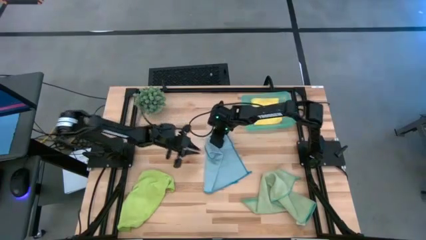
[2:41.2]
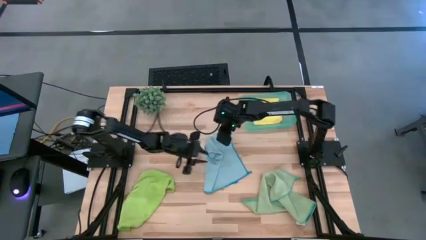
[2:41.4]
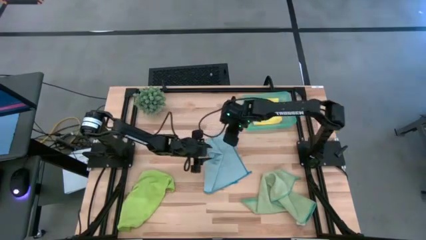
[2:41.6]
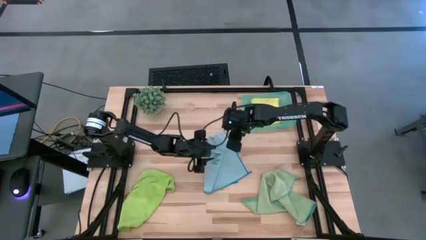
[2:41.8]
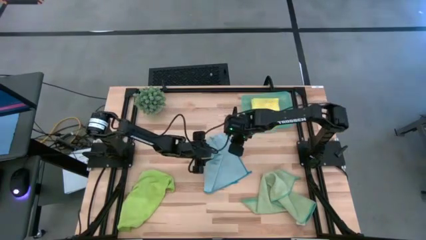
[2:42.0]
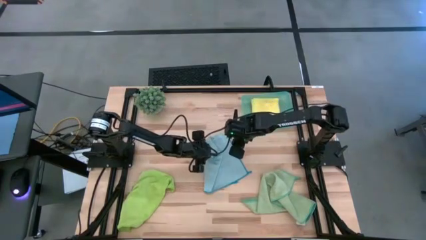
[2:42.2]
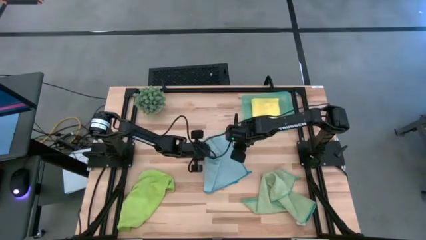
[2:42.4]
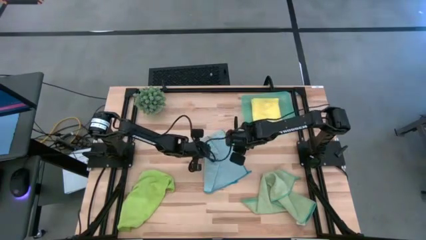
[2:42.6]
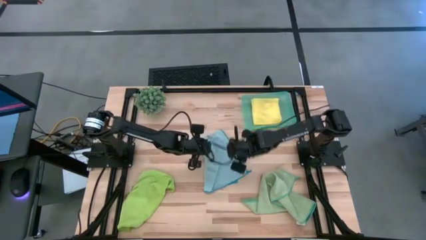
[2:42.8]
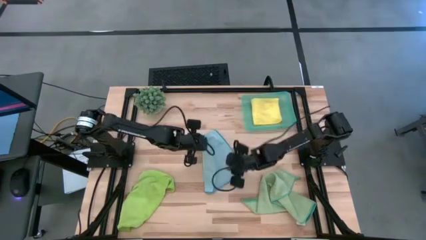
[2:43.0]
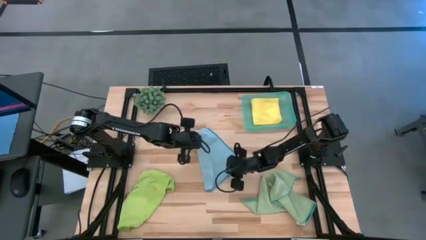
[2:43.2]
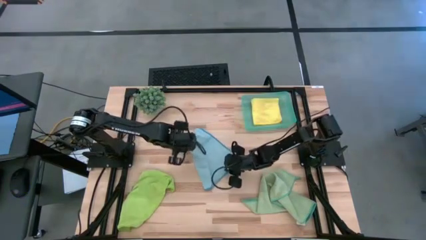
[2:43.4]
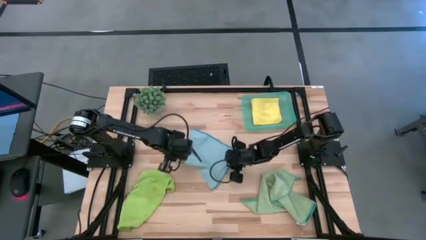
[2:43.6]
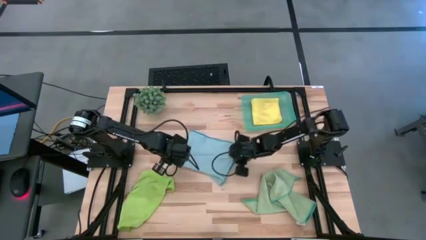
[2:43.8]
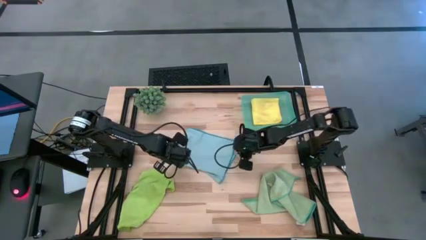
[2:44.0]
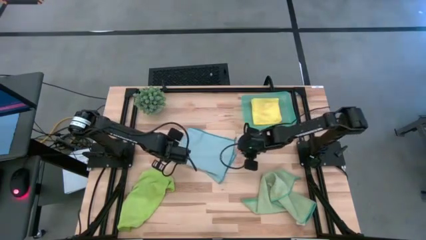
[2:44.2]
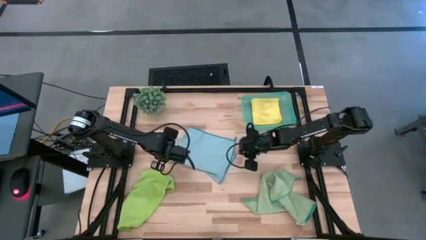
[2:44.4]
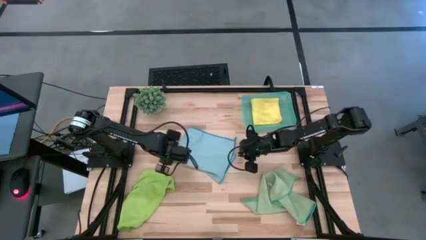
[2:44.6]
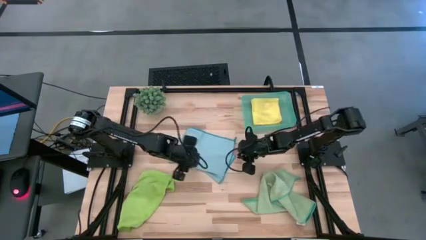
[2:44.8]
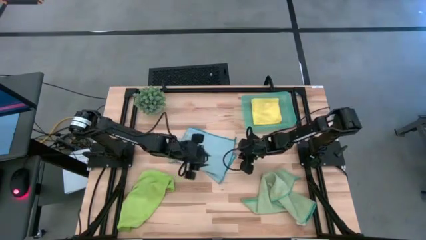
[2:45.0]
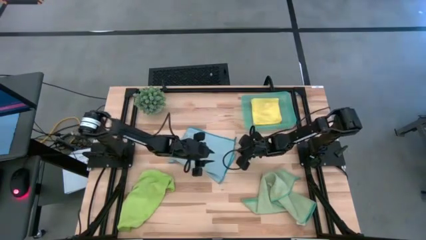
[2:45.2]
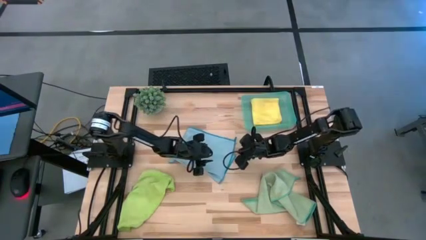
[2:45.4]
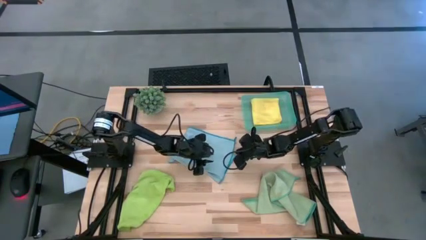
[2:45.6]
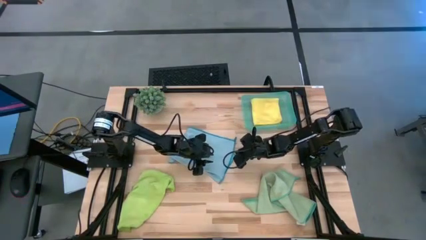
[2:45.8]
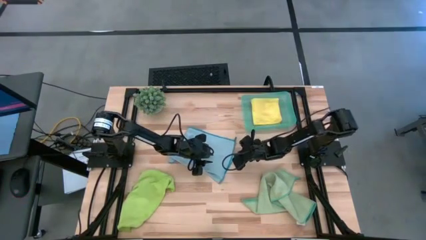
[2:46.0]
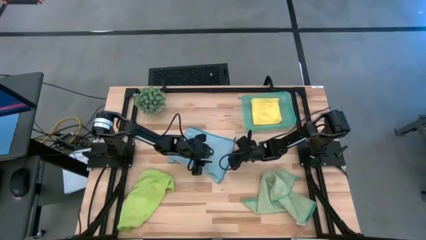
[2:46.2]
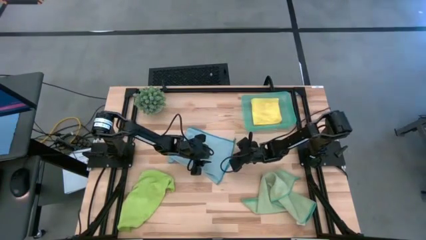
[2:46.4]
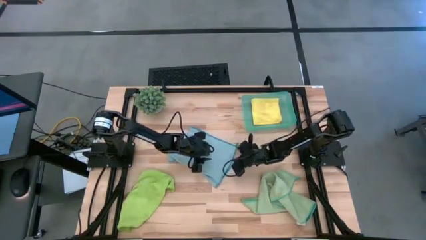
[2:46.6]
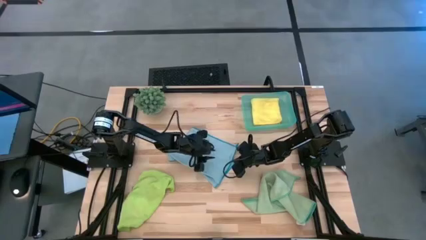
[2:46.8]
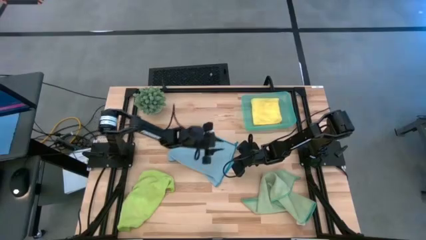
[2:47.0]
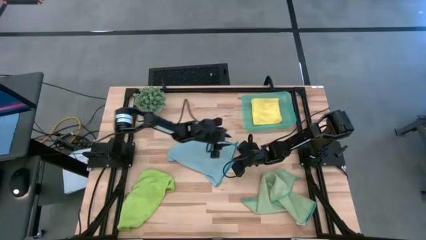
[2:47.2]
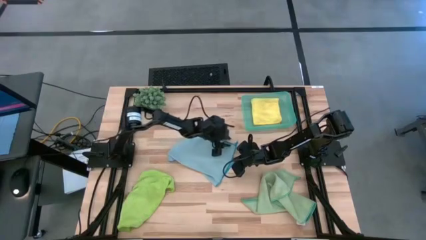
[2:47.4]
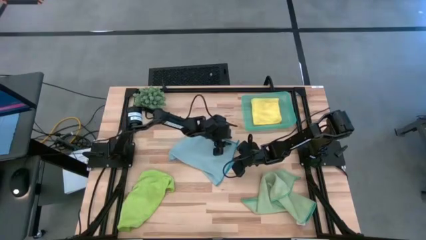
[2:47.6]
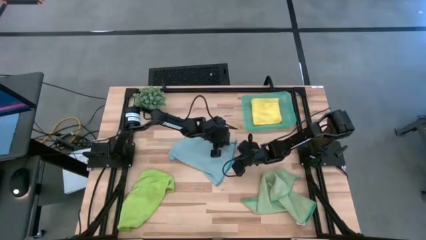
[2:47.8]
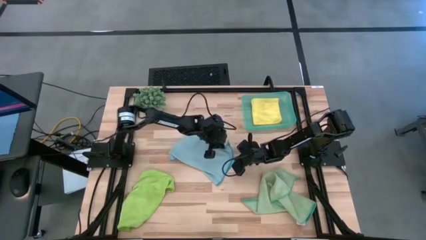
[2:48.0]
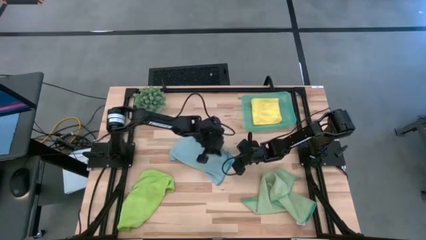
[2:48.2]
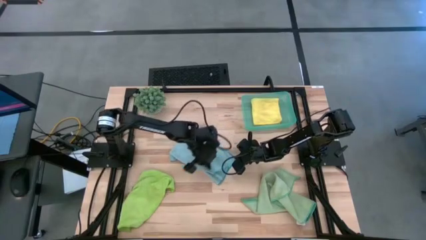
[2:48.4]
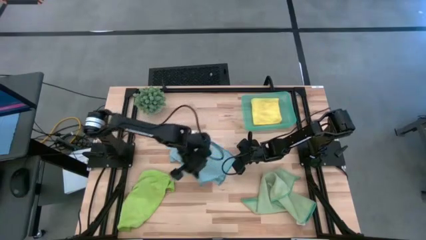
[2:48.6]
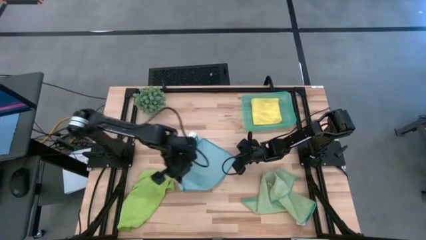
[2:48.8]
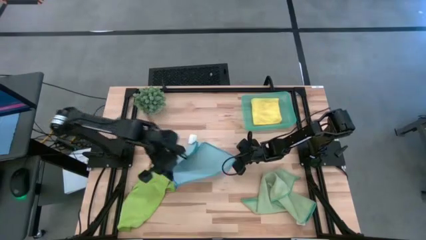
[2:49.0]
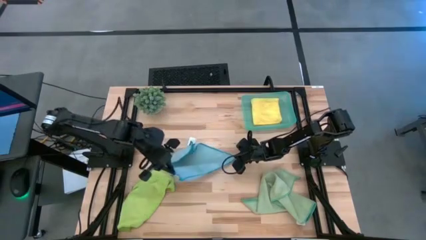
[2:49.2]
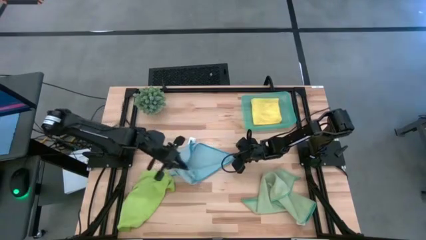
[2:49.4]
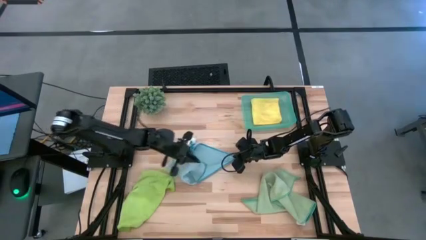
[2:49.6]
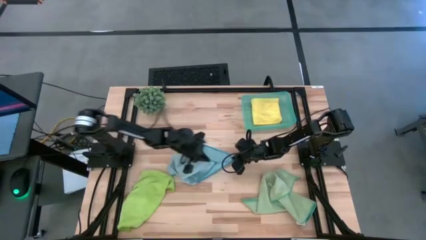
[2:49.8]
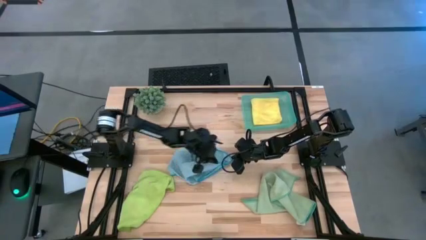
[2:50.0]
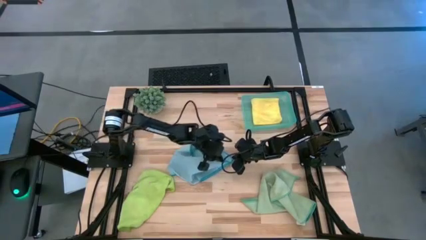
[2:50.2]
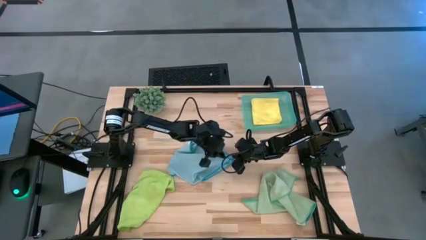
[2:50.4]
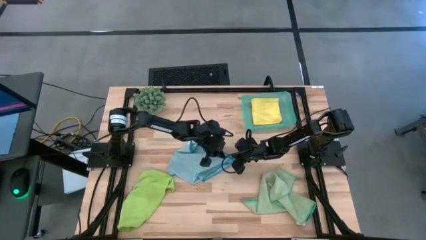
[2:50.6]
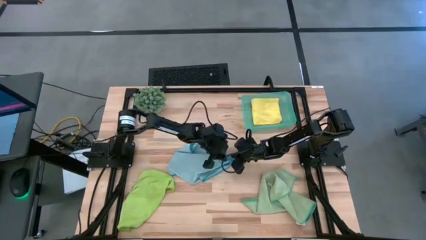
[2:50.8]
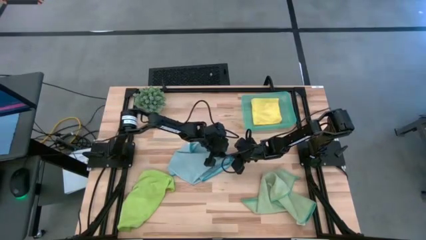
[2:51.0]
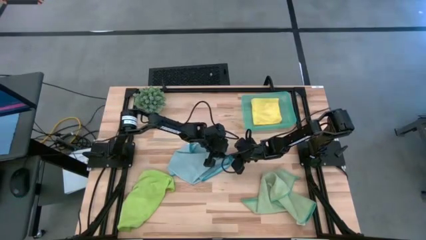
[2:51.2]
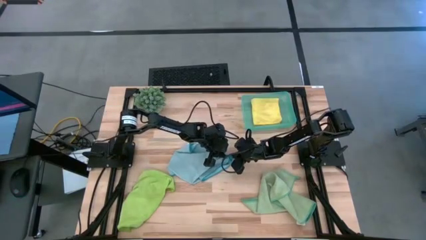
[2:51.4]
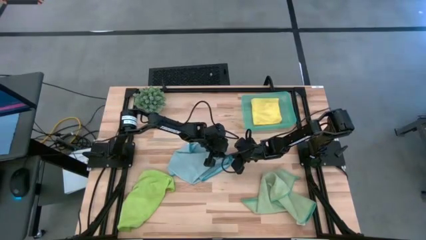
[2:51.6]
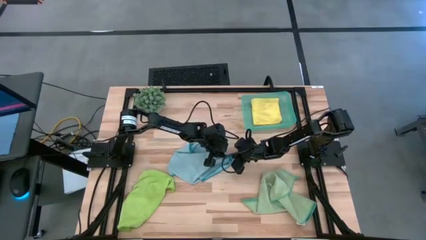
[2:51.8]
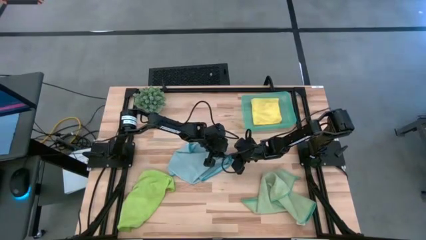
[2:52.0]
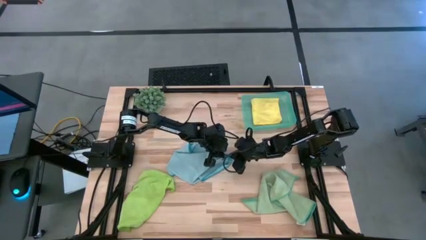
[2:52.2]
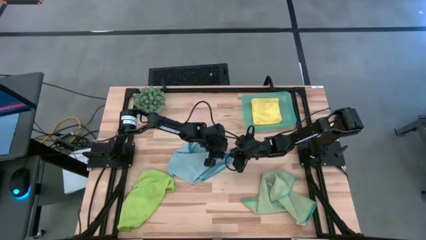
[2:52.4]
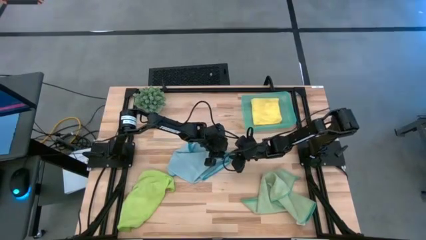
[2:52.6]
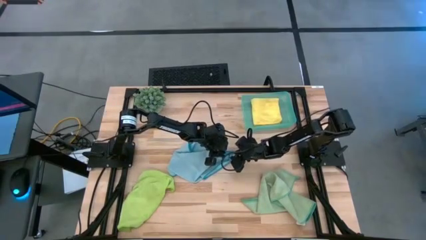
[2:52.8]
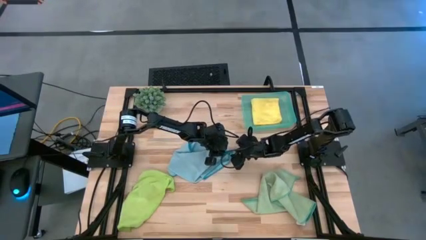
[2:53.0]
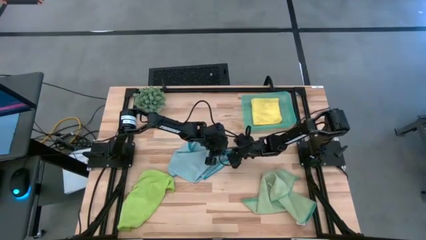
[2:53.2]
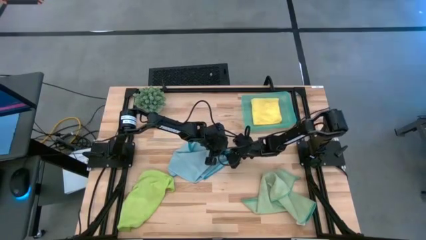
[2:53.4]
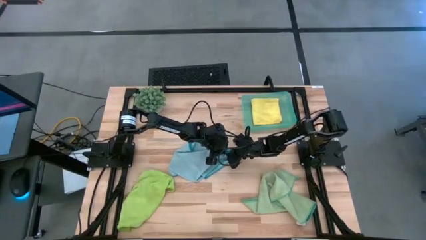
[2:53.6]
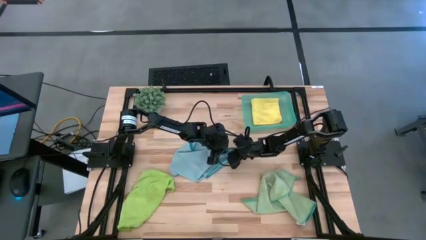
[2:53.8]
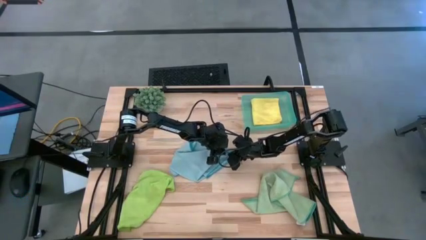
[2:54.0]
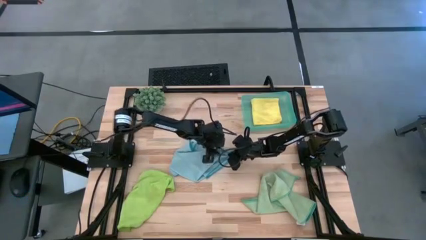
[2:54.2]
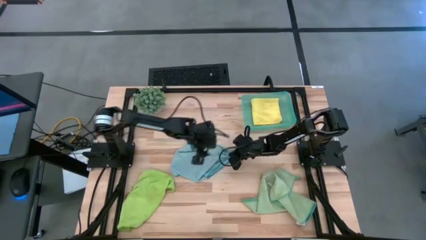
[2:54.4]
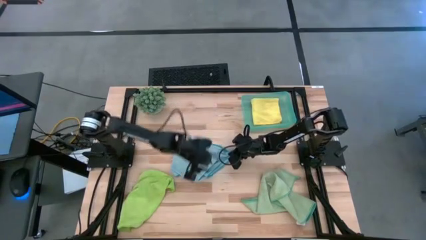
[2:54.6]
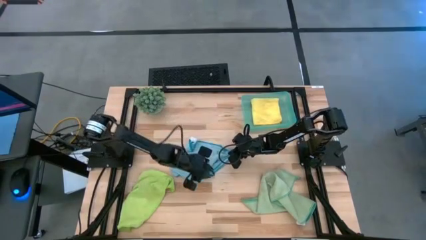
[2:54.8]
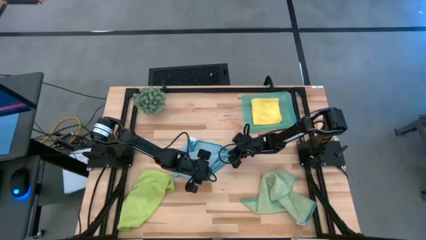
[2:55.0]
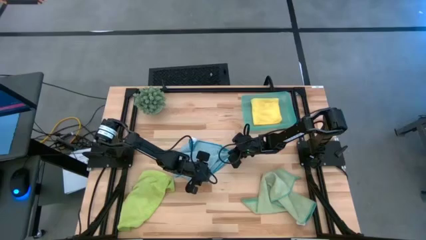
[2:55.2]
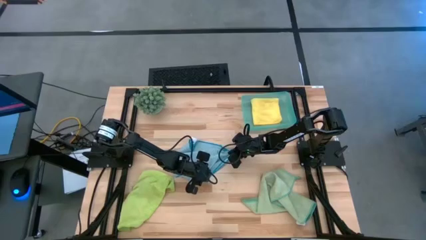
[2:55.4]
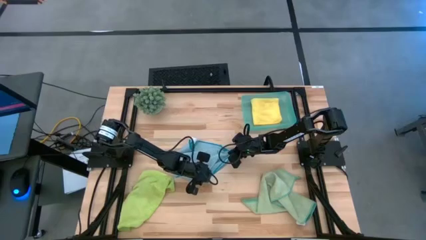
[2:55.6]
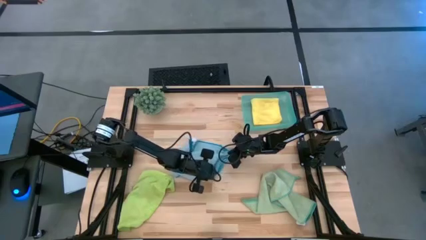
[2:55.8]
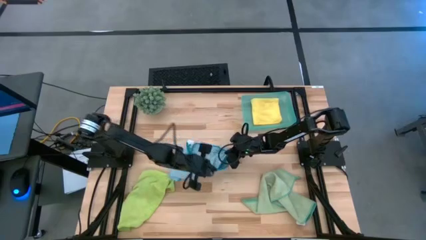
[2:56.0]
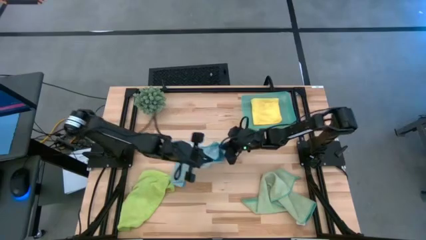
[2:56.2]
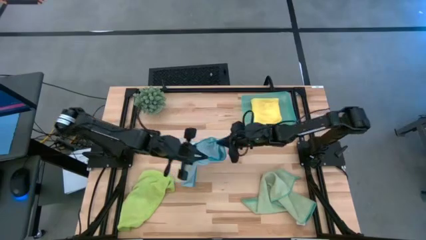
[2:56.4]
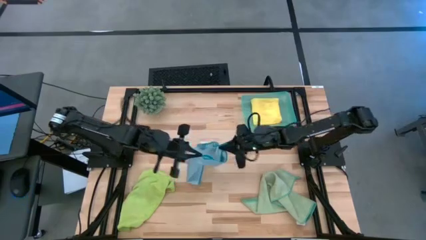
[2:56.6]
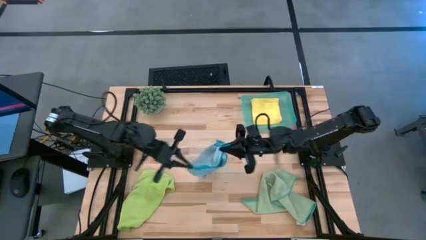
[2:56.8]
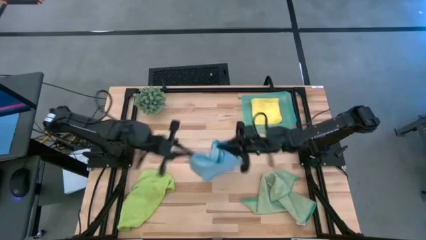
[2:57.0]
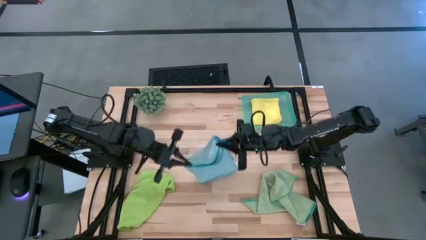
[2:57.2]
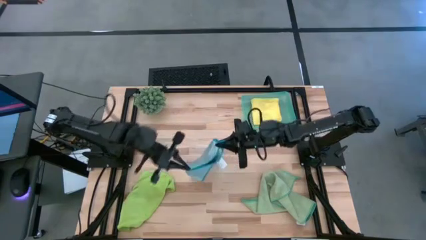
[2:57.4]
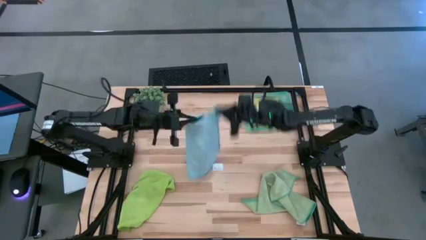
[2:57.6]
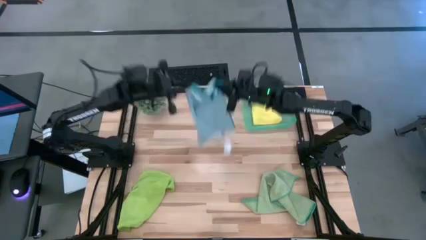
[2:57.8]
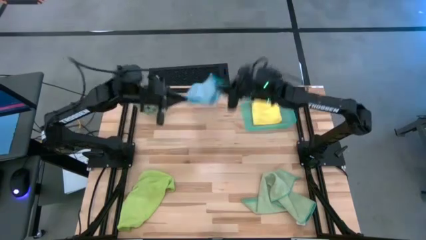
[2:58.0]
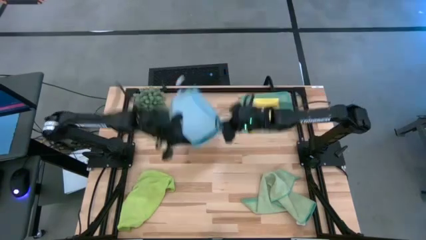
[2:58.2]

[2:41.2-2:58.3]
Task: Fold microfiber towels
Fold the blue microfiber cloth
